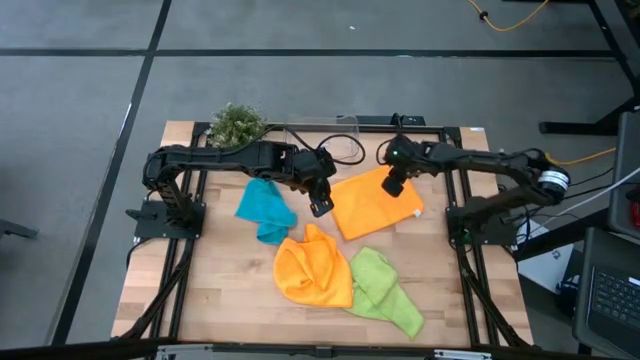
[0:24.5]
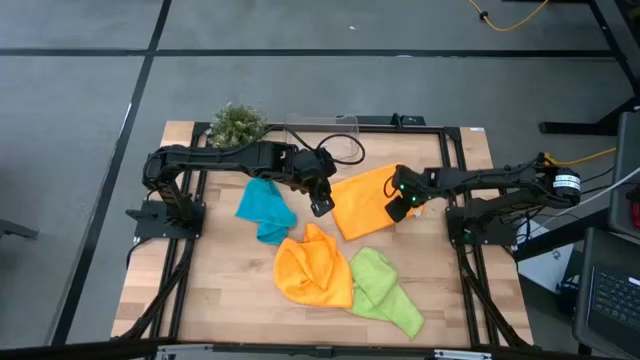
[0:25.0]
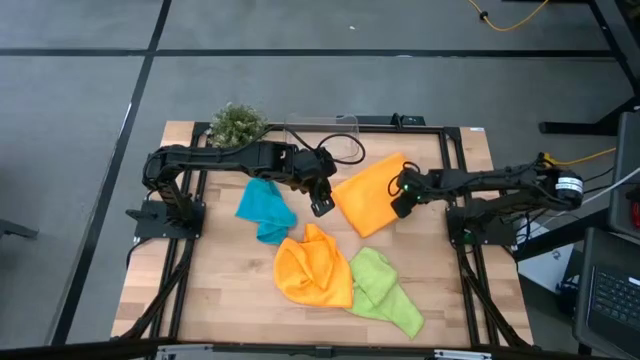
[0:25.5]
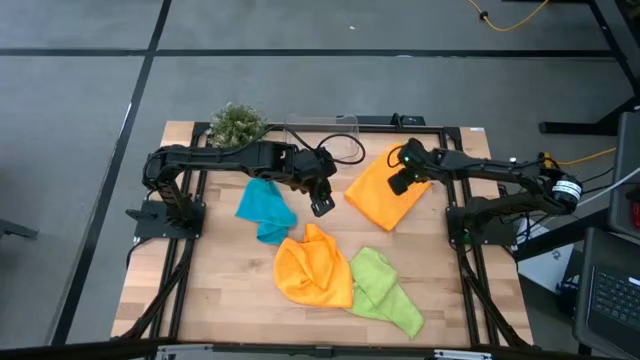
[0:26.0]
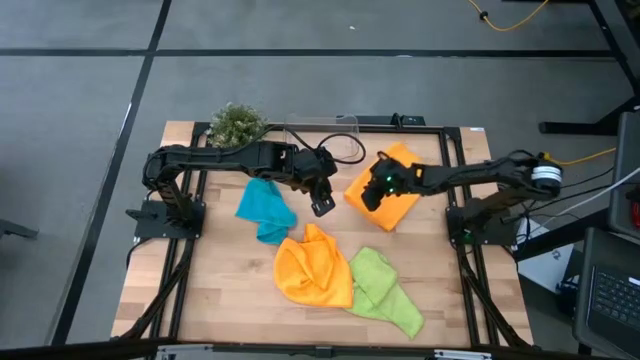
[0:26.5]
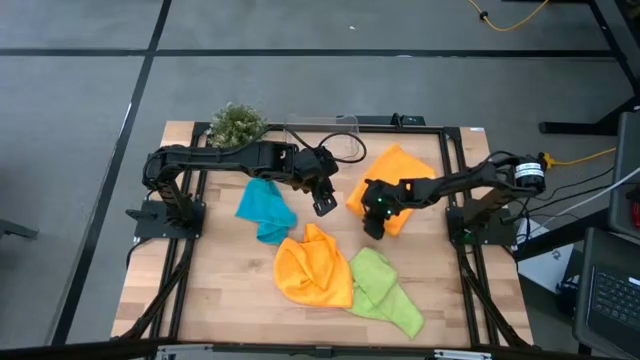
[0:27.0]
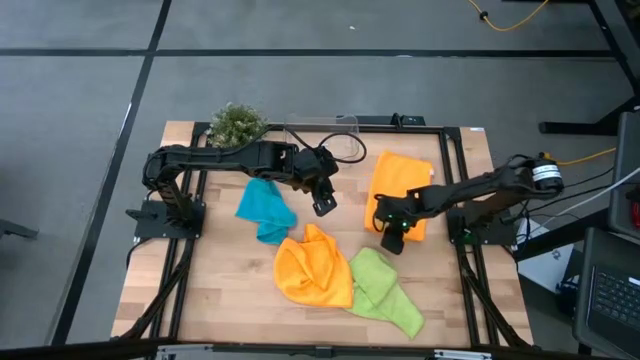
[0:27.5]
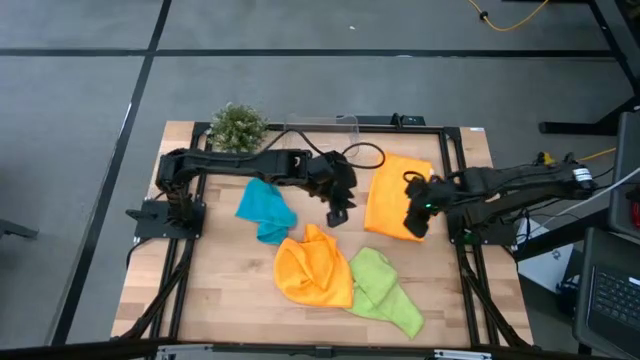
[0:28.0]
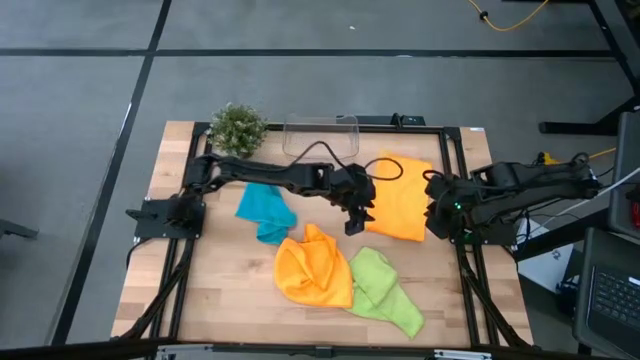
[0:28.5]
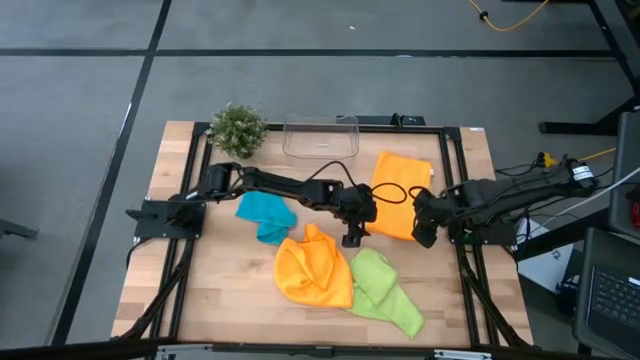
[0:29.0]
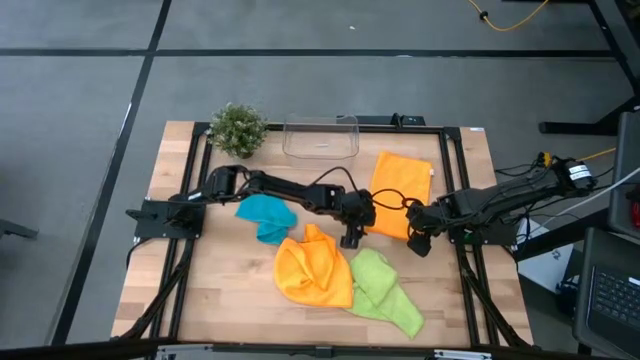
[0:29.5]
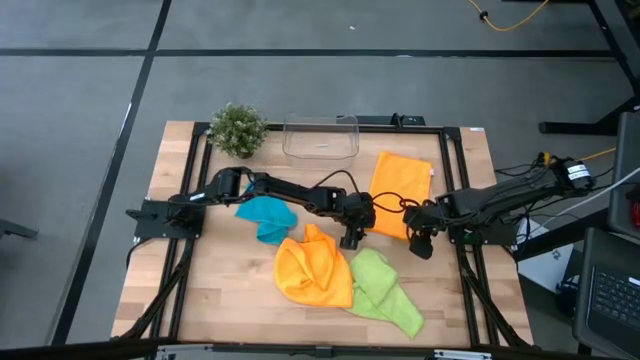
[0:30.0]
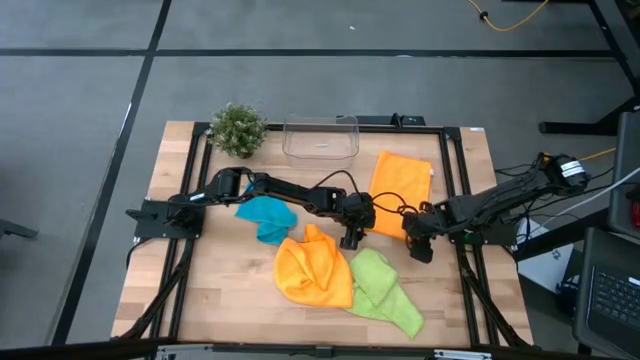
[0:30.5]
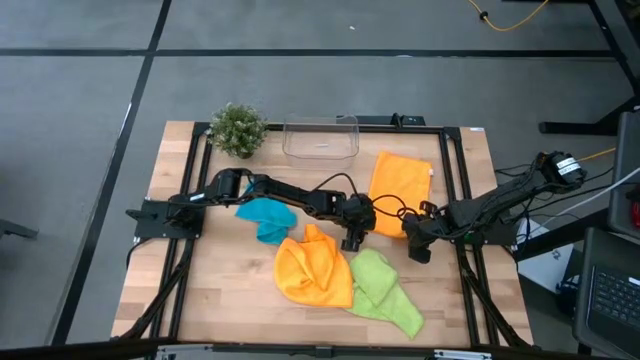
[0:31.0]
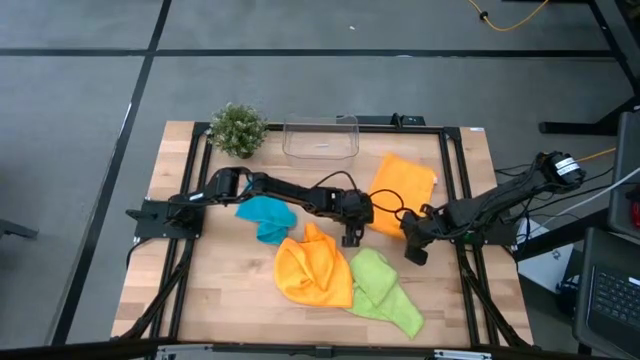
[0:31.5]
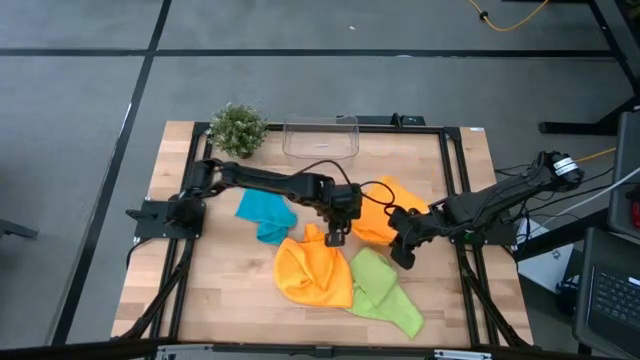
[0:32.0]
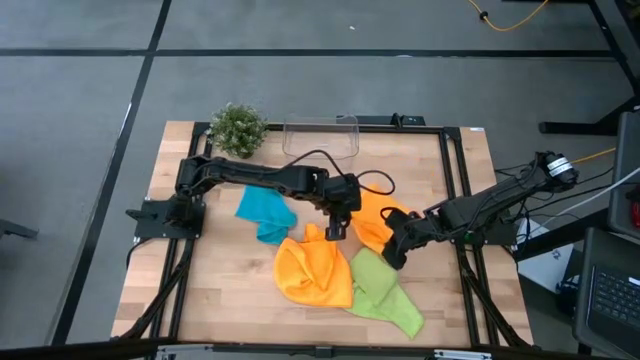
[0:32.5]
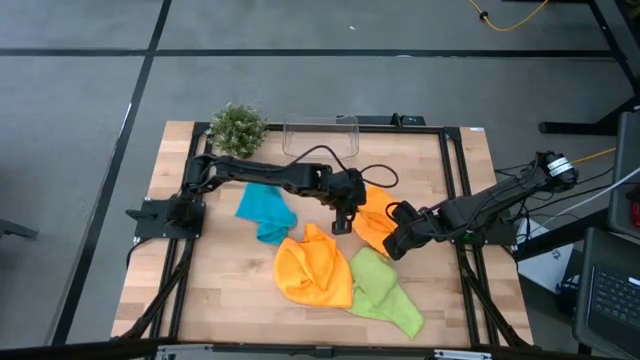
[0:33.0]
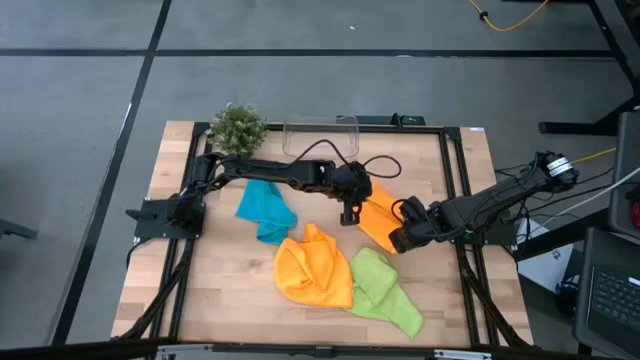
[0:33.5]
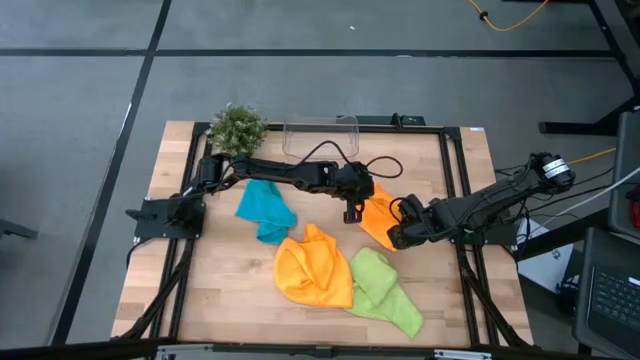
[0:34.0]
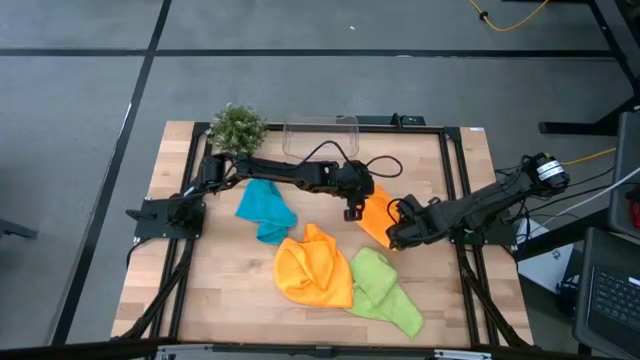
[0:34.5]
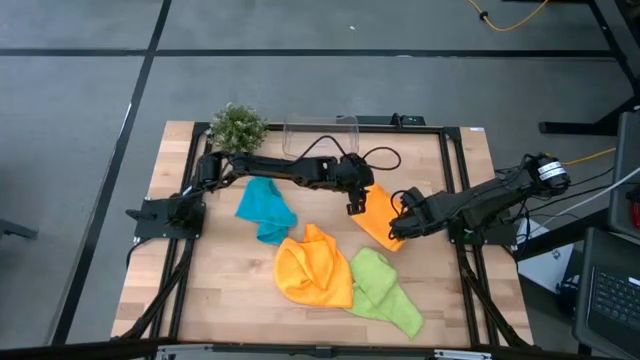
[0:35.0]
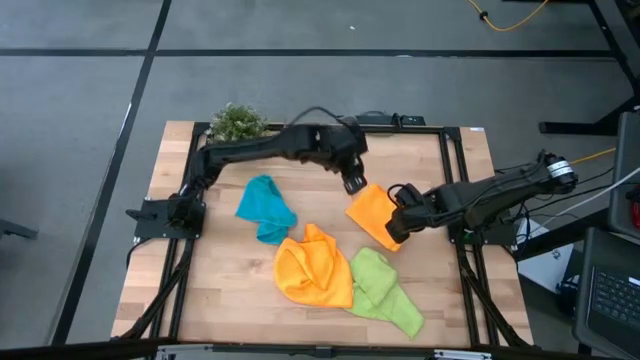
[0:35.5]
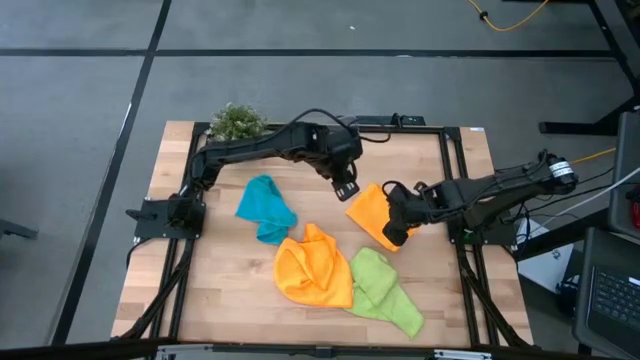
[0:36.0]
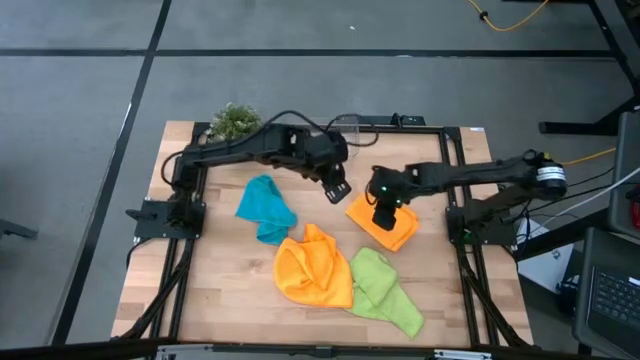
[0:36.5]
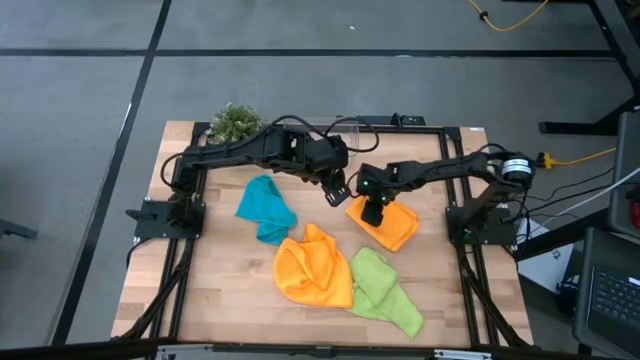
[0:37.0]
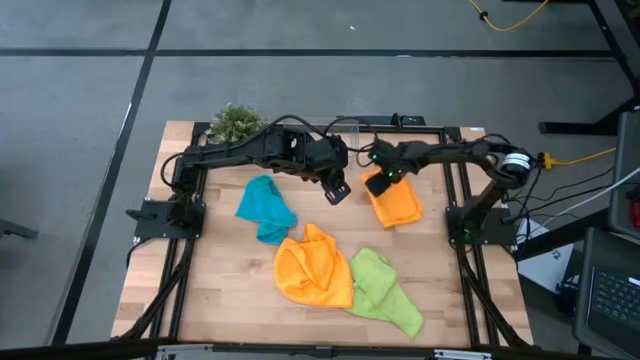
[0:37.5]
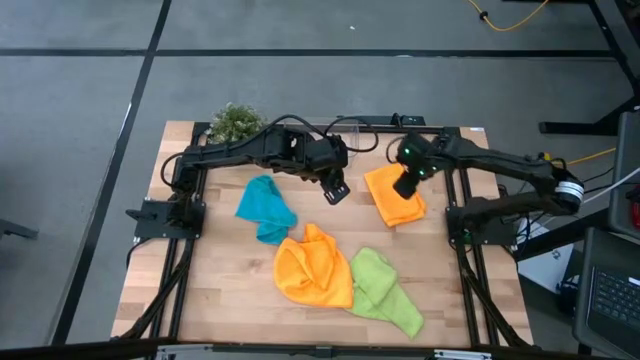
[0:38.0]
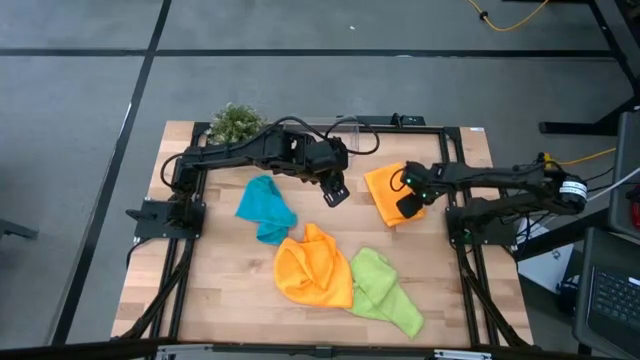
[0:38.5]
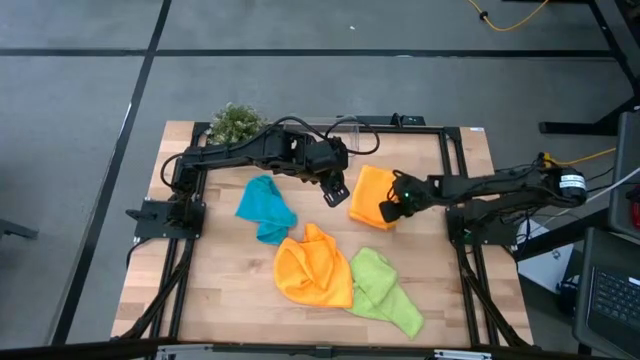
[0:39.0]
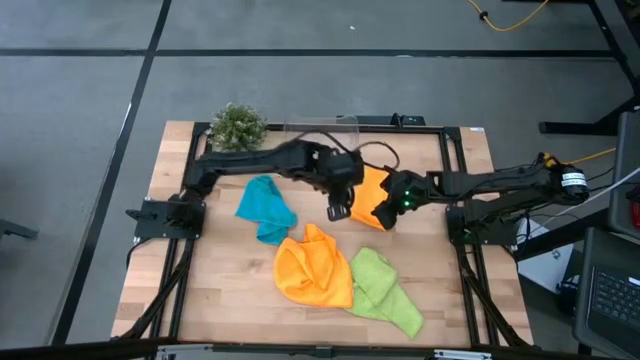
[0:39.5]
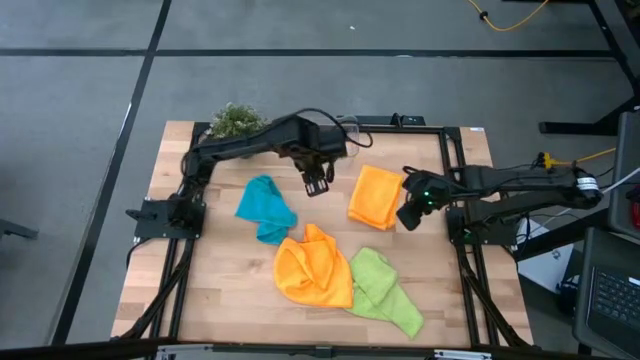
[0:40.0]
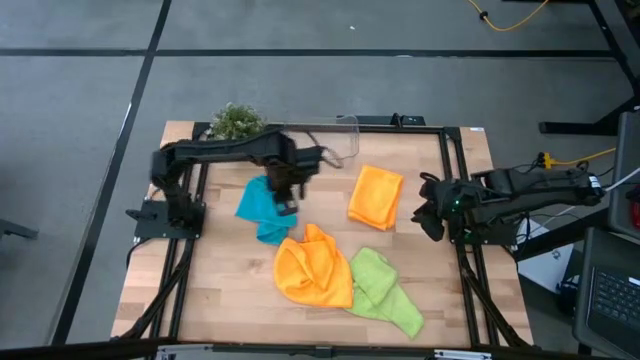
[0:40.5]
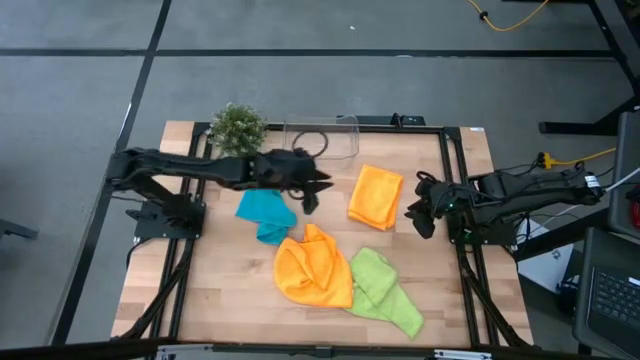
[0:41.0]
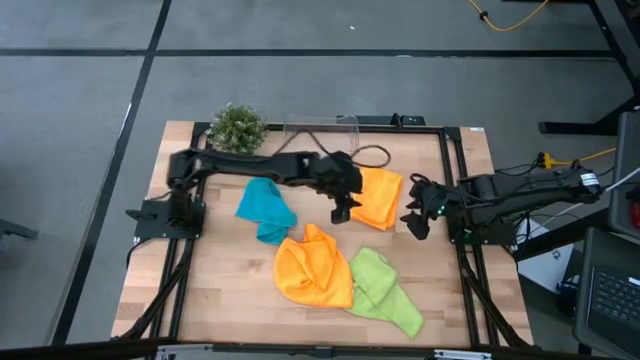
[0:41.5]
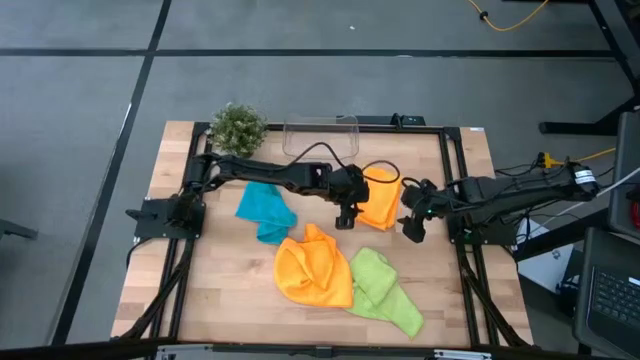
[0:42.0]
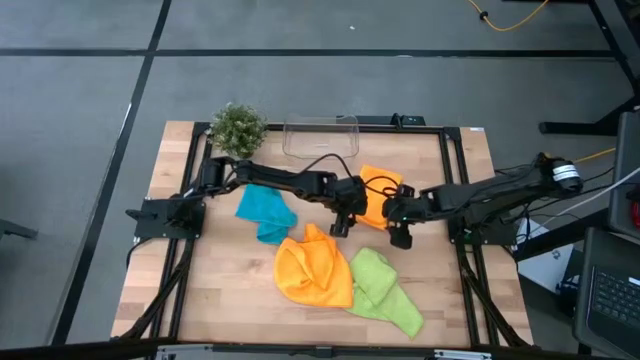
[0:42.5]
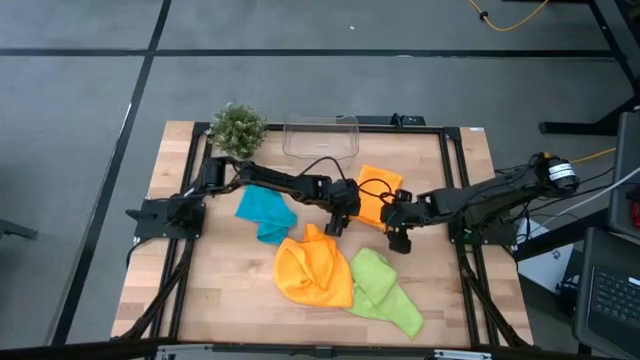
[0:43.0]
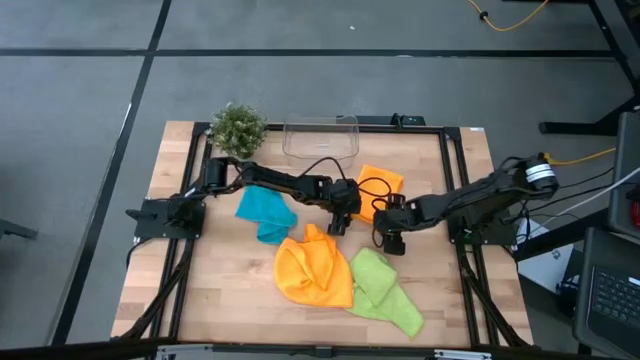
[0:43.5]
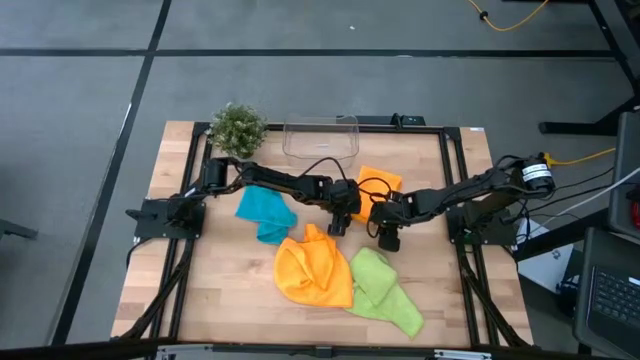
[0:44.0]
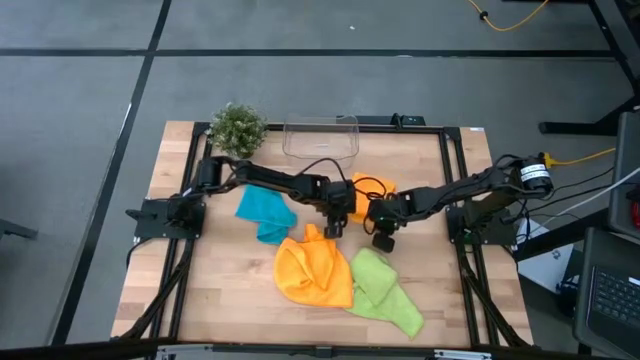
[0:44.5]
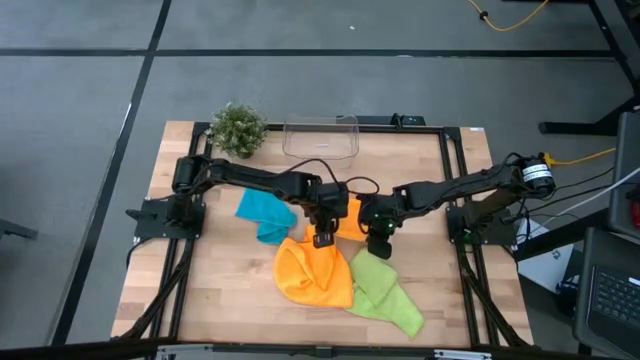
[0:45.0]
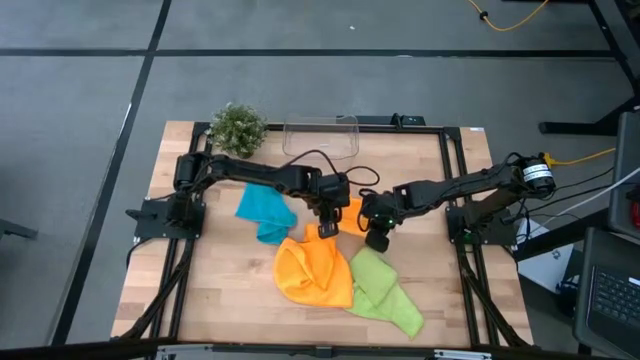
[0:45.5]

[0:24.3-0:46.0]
Task: Fold microfiber towels
Fold the top orange microfiber cloth
